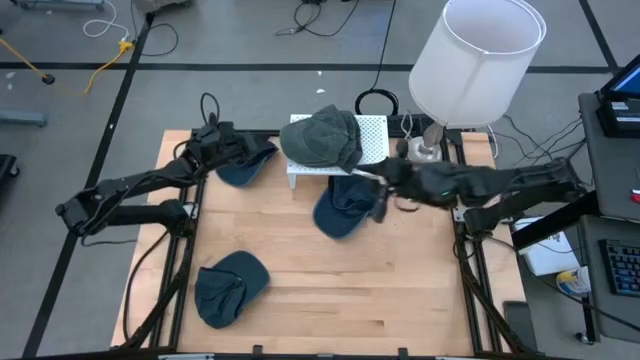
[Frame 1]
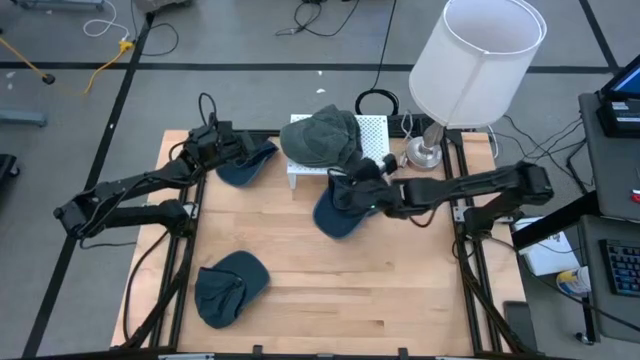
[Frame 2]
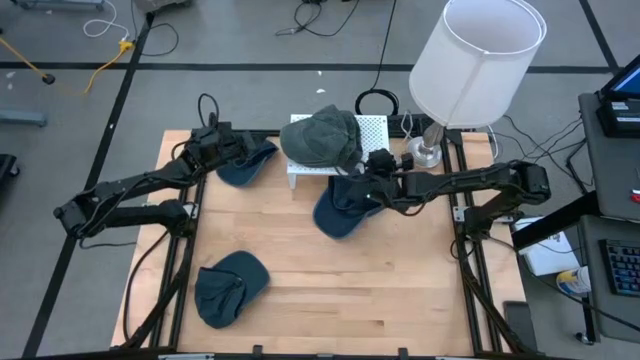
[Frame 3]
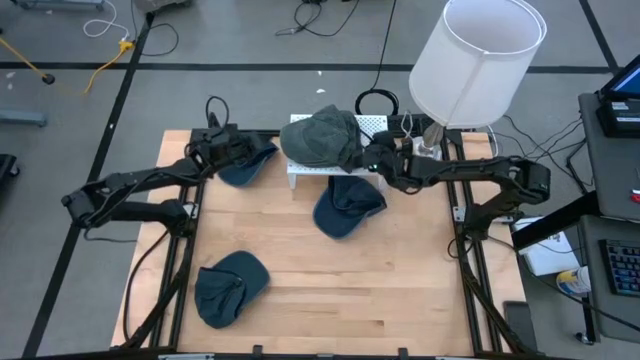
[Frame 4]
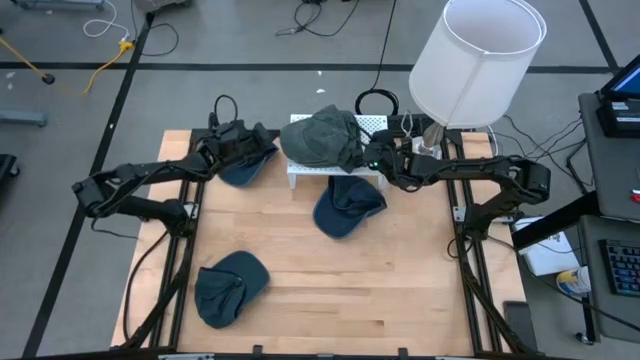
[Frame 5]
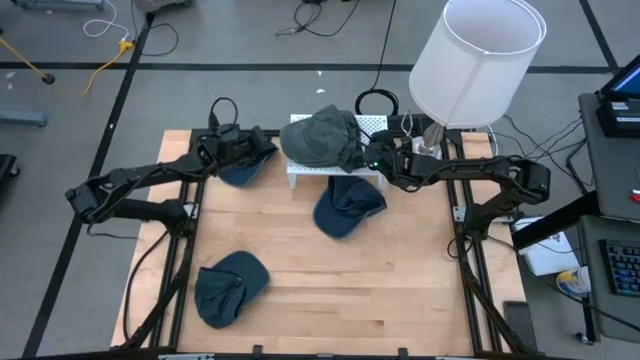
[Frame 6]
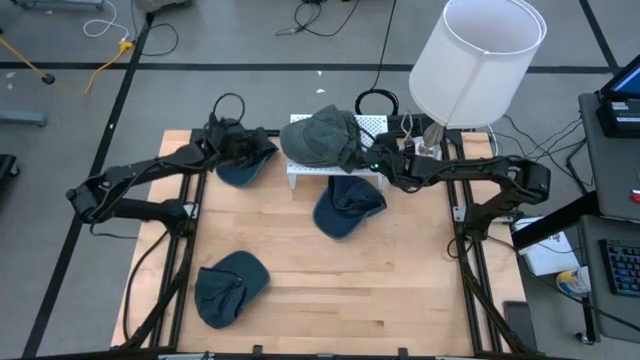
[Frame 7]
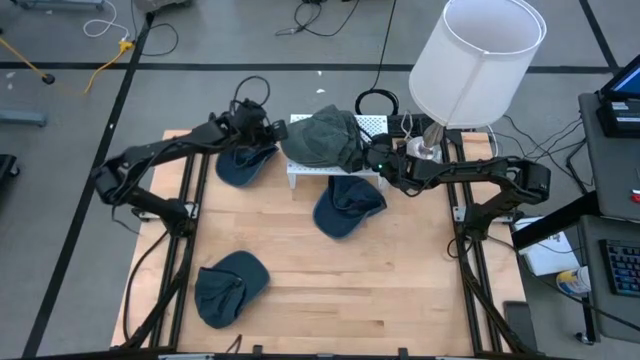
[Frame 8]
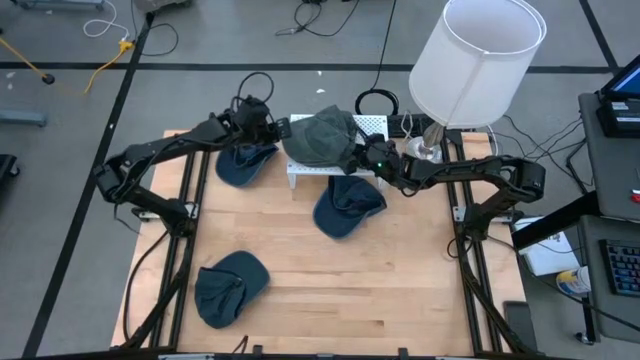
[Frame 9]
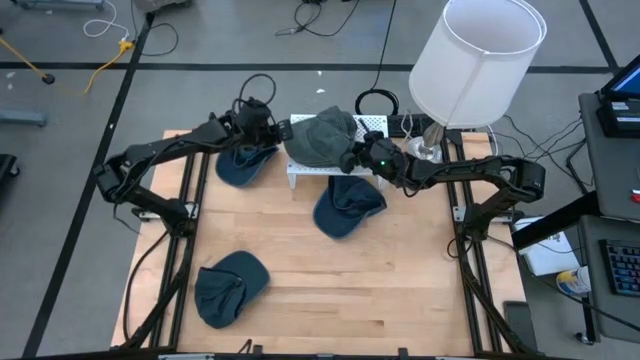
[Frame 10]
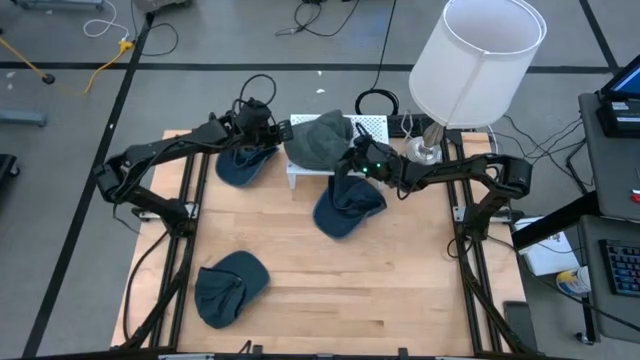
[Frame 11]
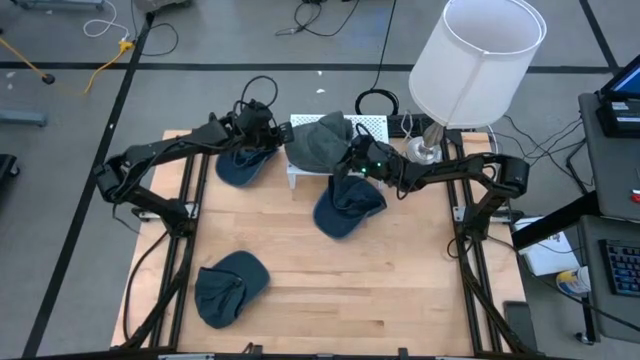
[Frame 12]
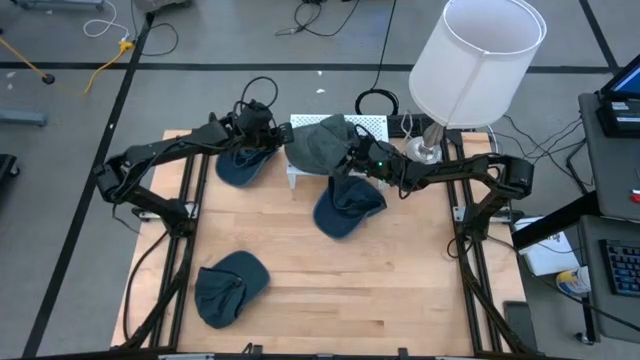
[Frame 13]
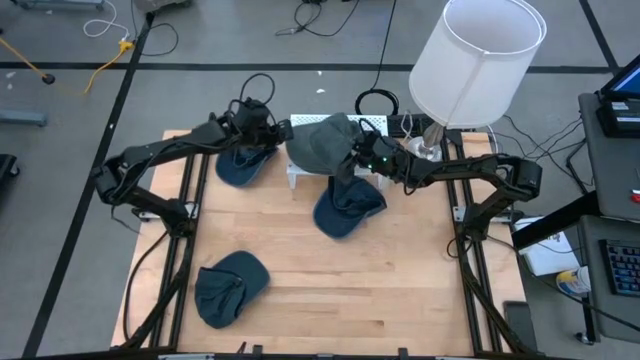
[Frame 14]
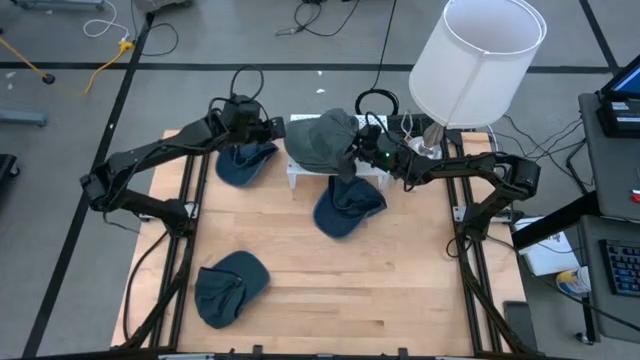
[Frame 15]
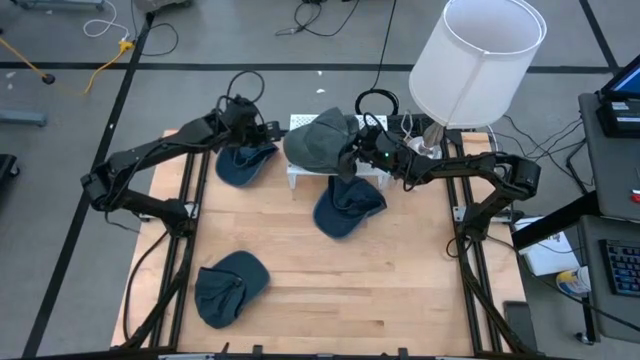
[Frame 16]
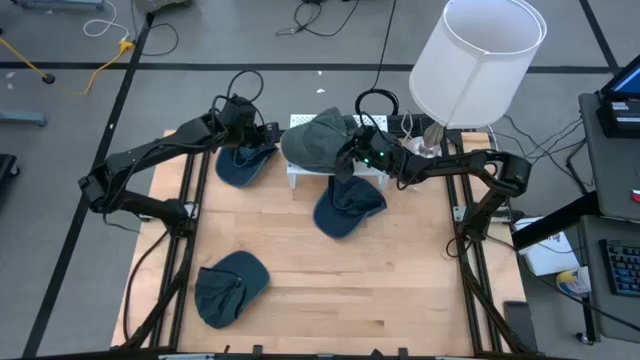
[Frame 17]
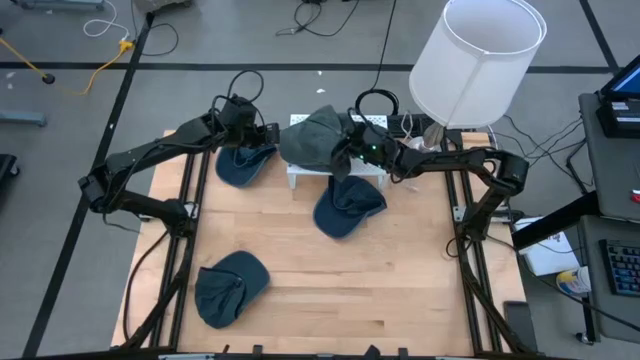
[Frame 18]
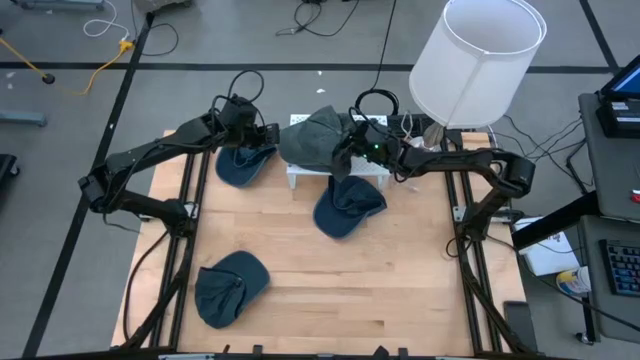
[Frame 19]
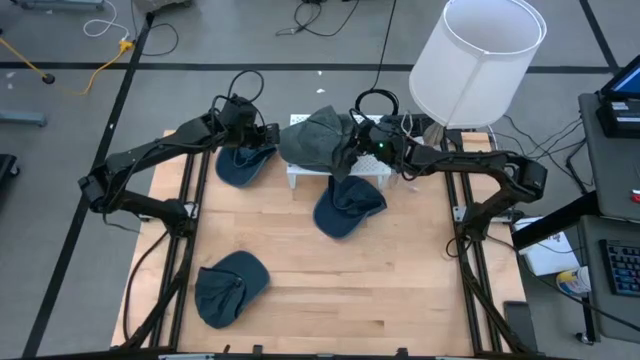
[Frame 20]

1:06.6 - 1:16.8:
Task: Pick & Place hat
Adjust the stacked gray caps on the shelf

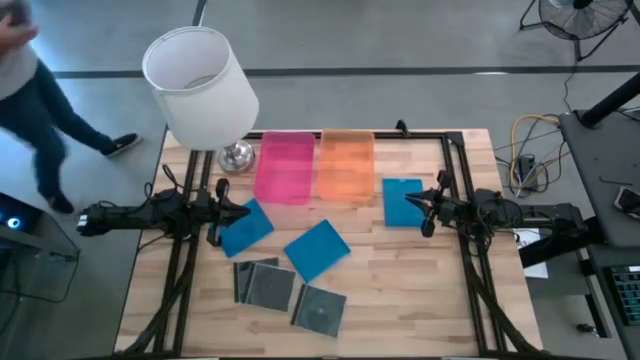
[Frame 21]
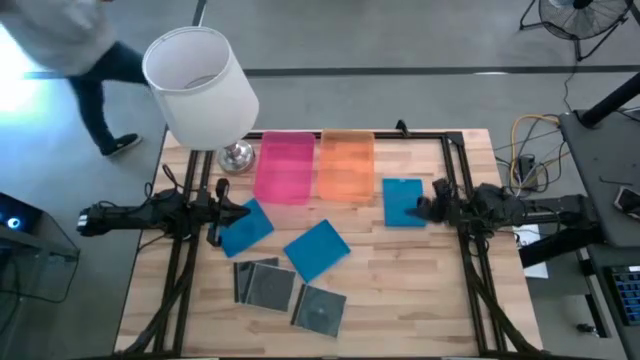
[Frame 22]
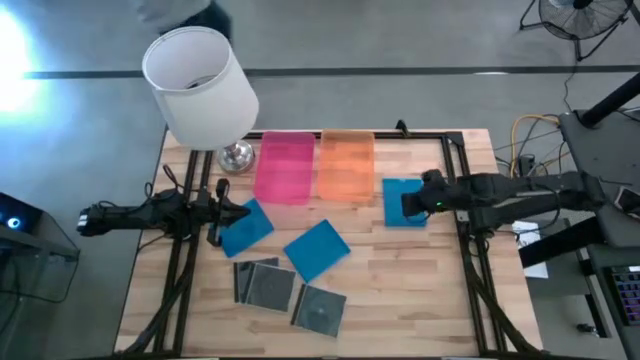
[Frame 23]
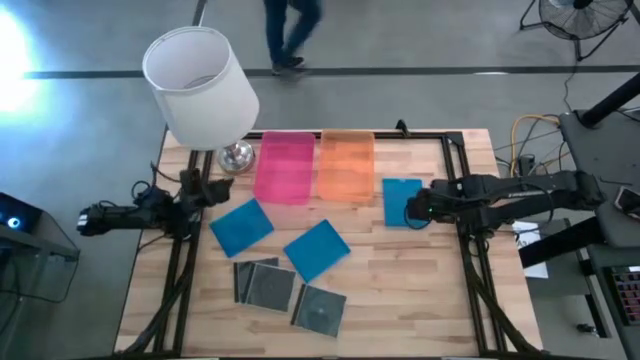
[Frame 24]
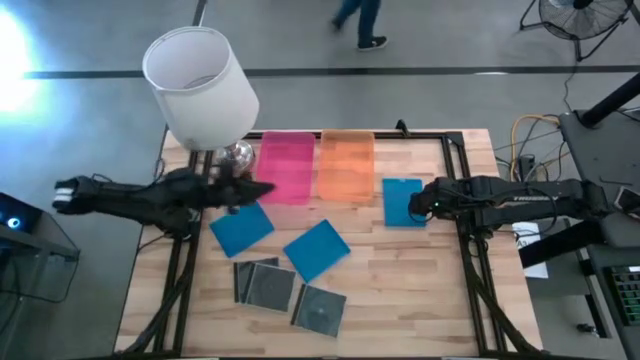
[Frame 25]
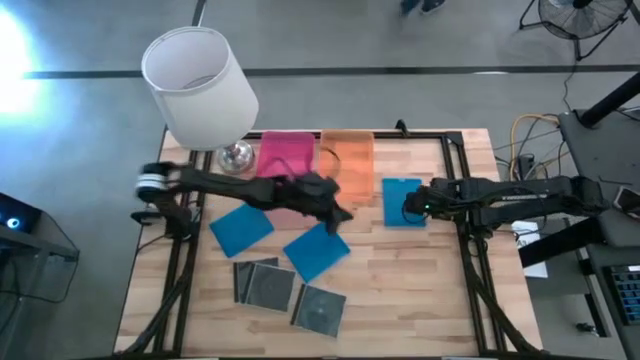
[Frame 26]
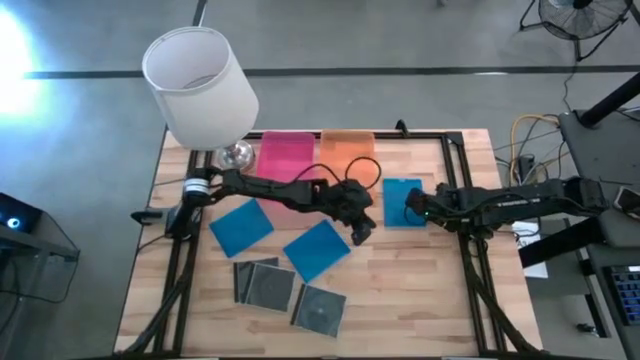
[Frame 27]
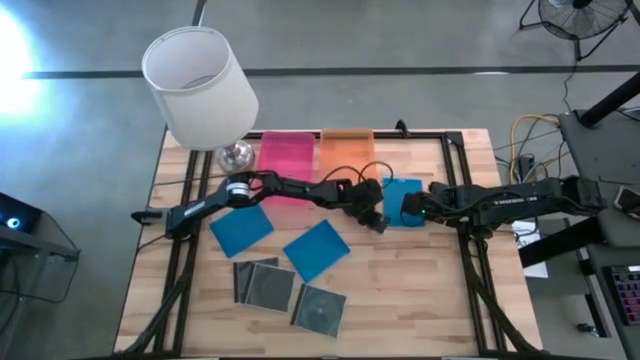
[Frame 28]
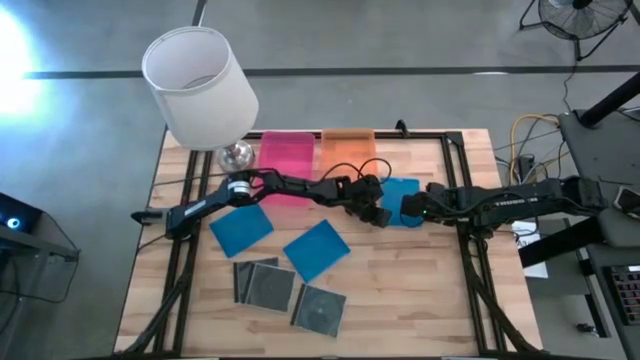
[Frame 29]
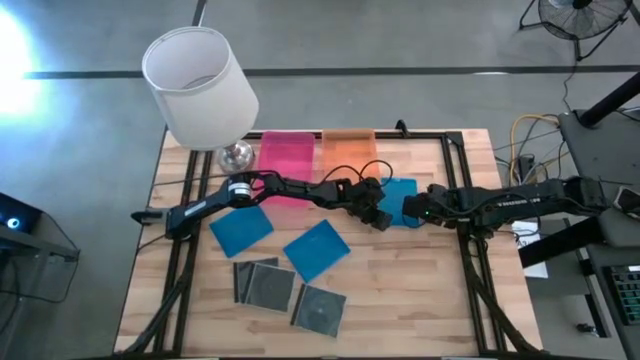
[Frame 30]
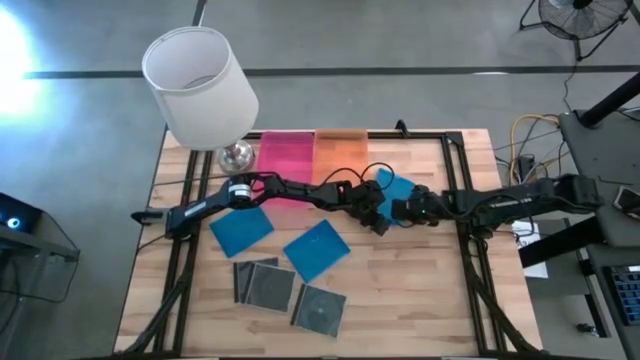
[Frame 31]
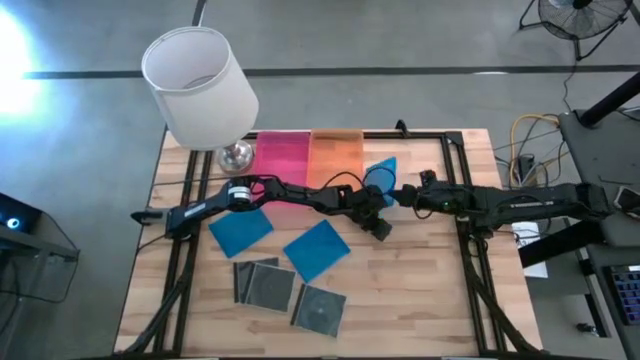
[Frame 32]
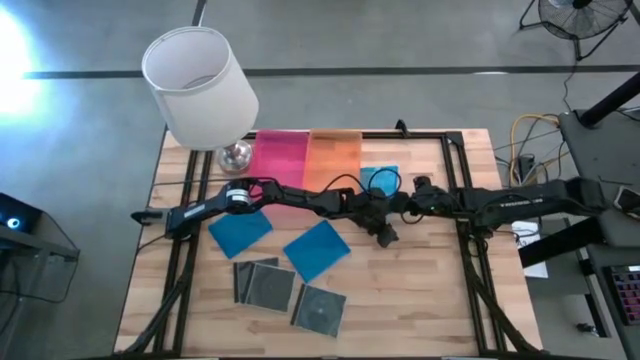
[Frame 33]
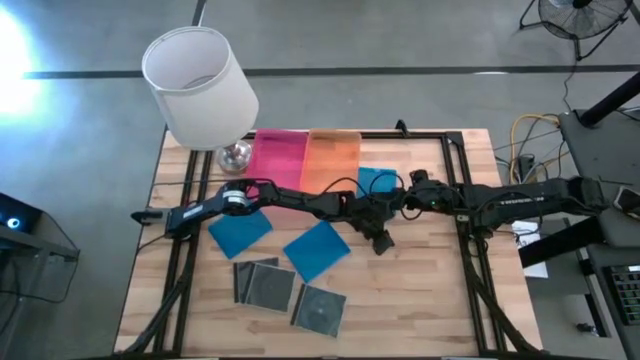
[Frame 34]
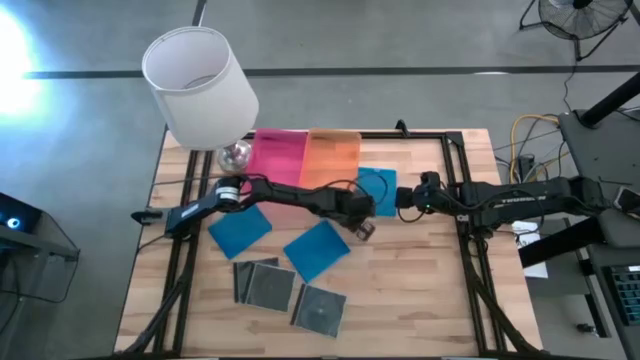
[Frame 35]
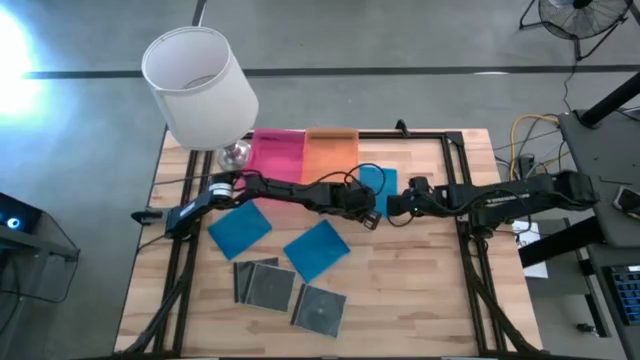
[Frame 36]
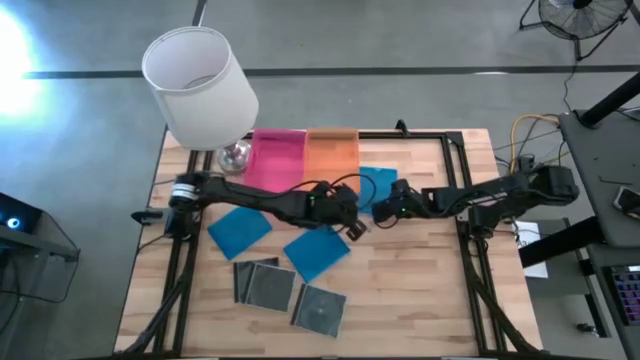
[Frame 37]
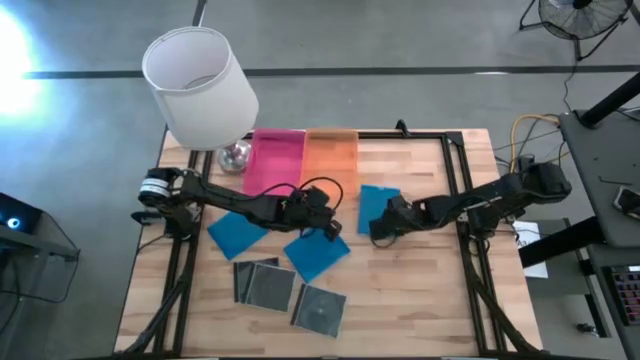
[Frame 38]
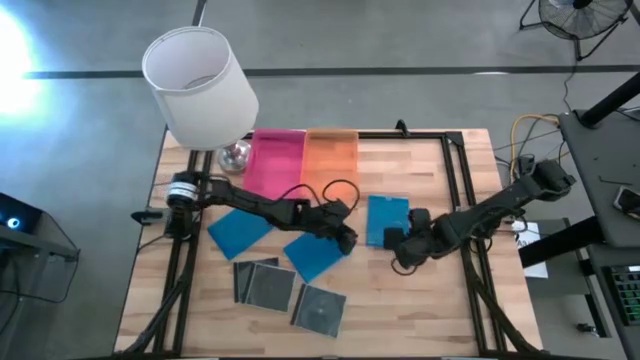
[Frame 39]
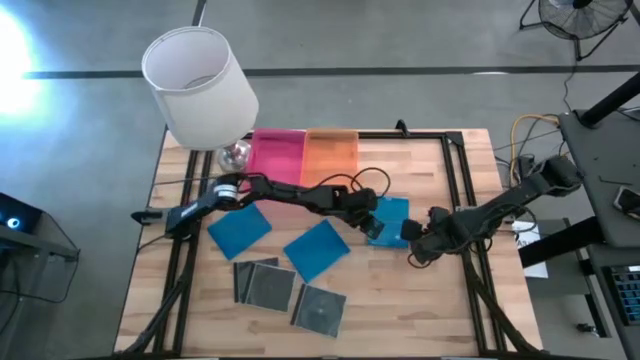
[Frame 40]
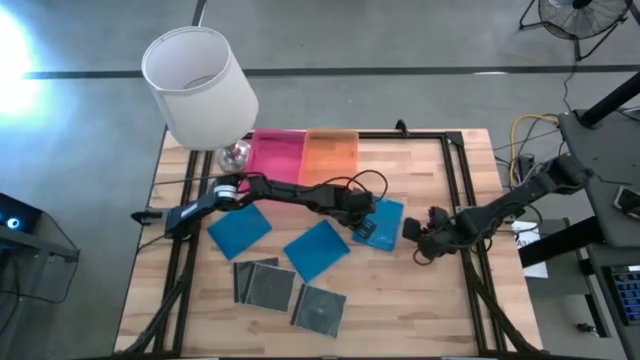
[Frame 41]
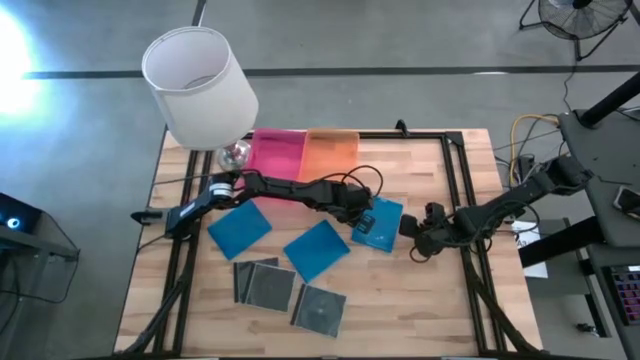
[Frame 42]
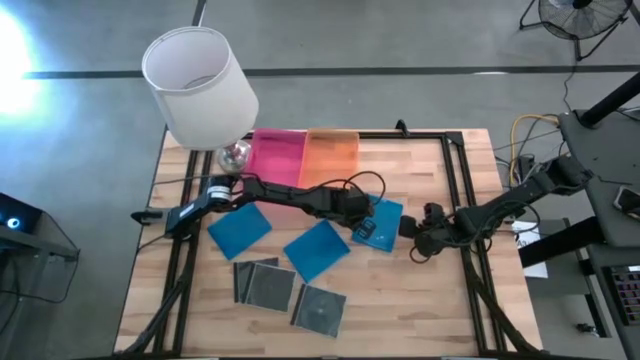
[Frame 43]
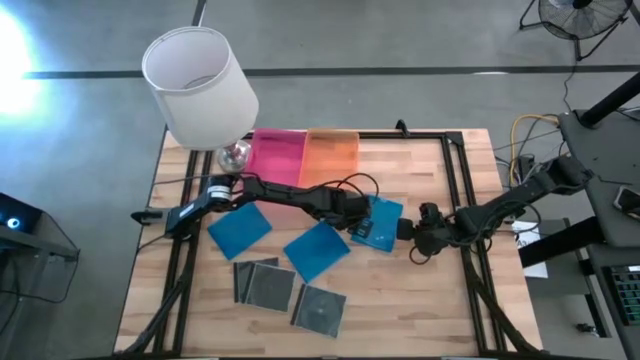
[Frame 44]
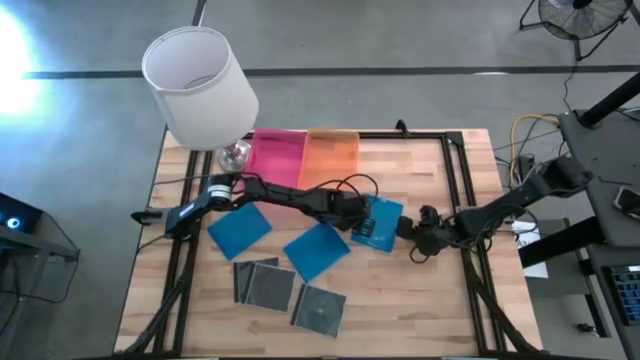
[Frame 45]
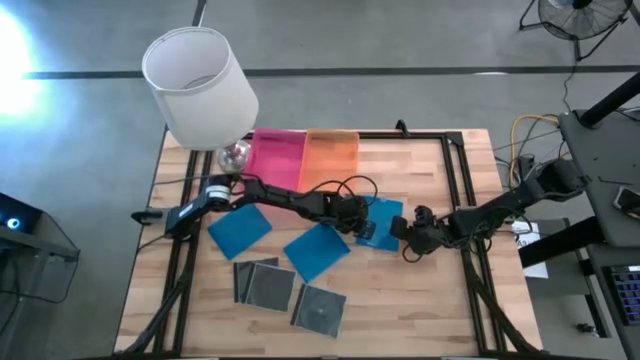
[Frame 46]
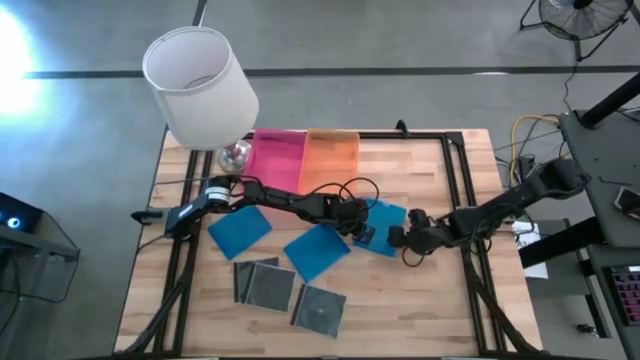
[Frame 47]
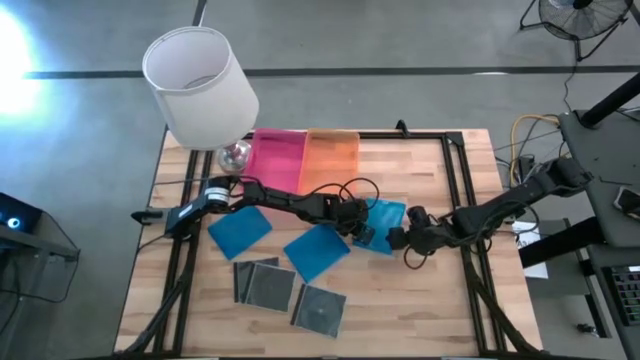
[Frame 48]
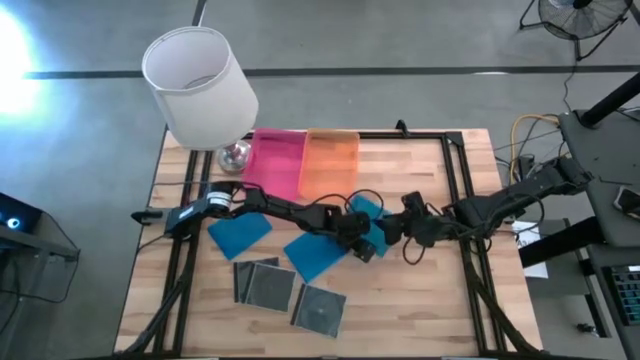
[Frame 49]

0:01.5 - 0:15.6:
Task: Pick & place jewel cases by type
Put the blue cd case into the orange bin
